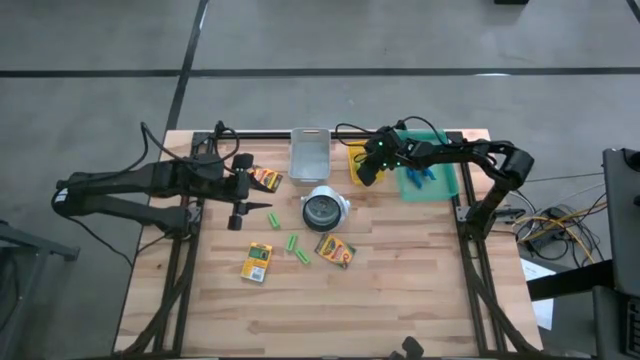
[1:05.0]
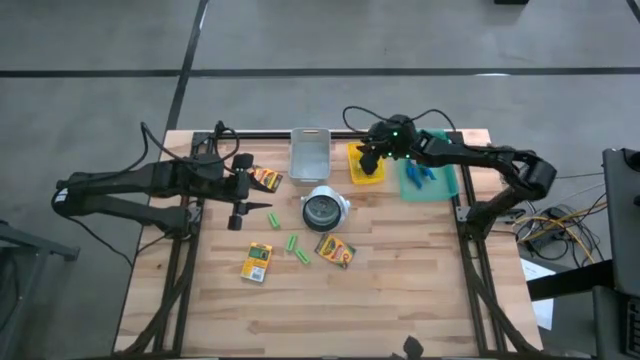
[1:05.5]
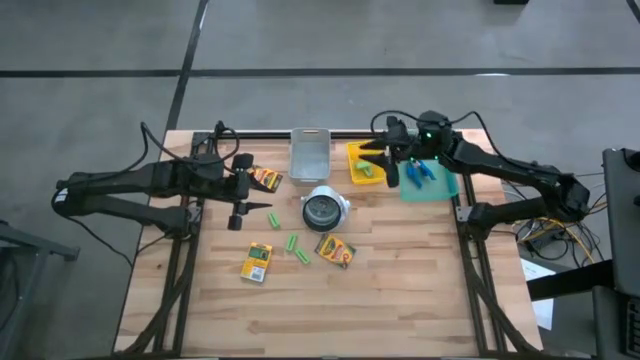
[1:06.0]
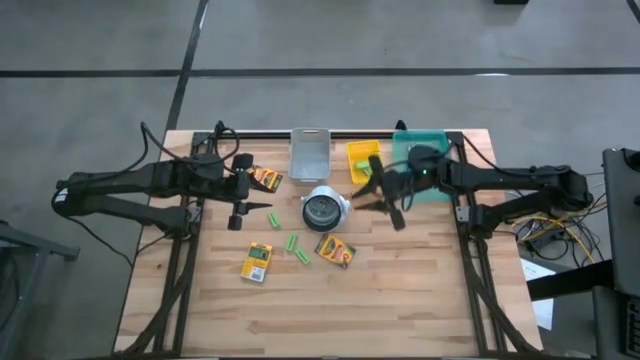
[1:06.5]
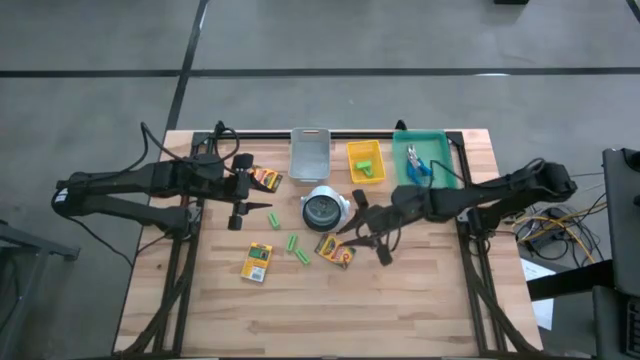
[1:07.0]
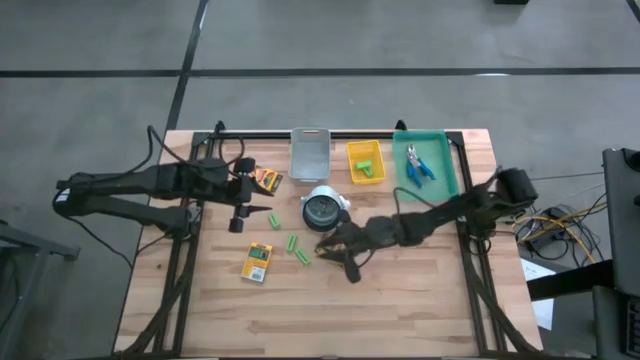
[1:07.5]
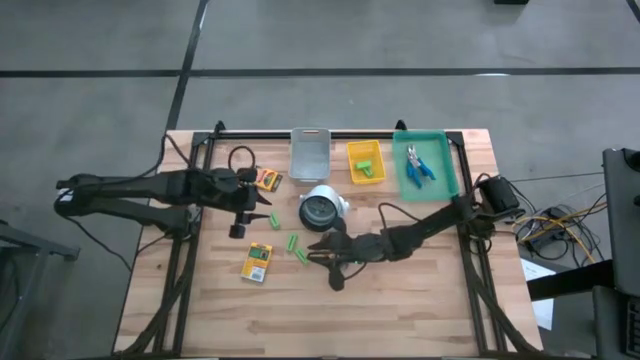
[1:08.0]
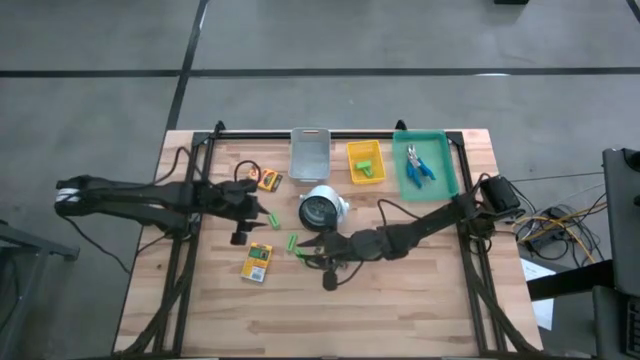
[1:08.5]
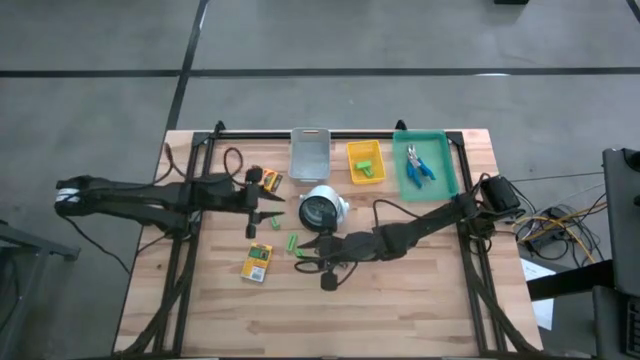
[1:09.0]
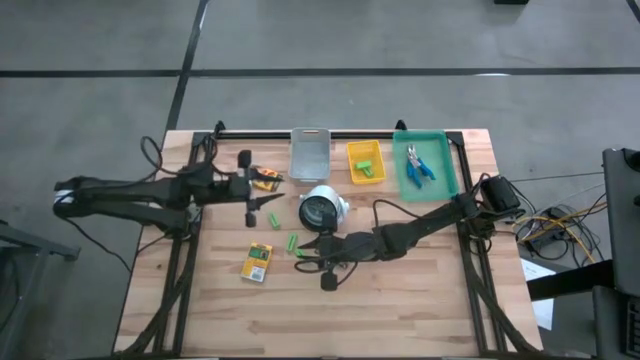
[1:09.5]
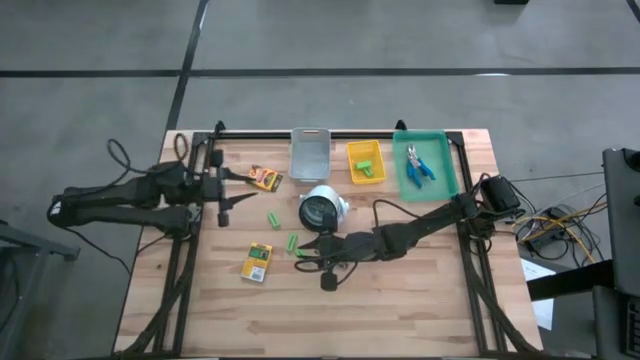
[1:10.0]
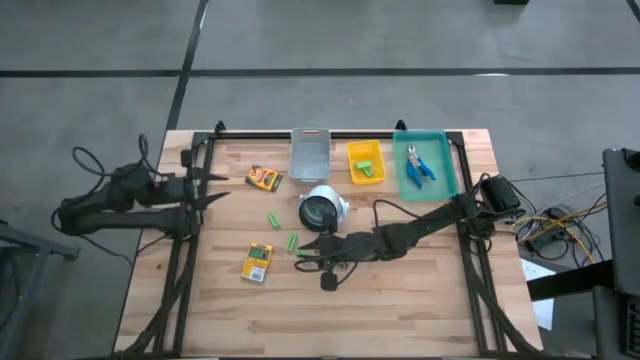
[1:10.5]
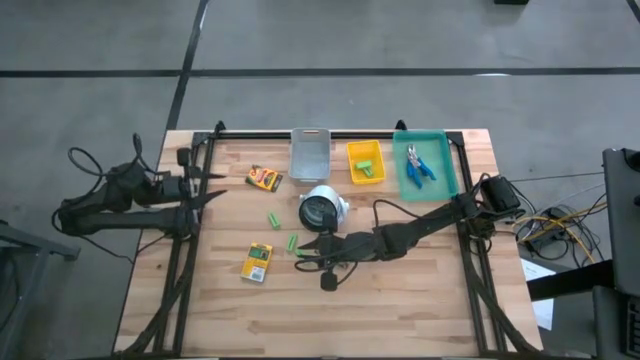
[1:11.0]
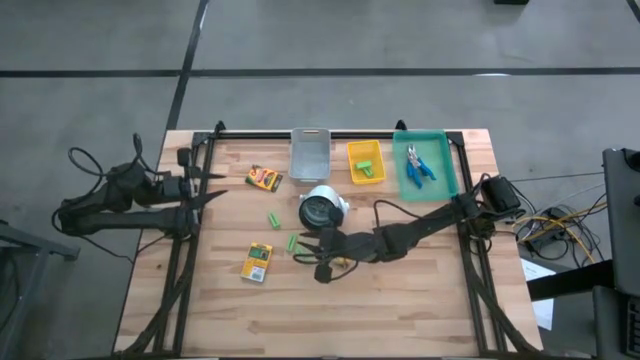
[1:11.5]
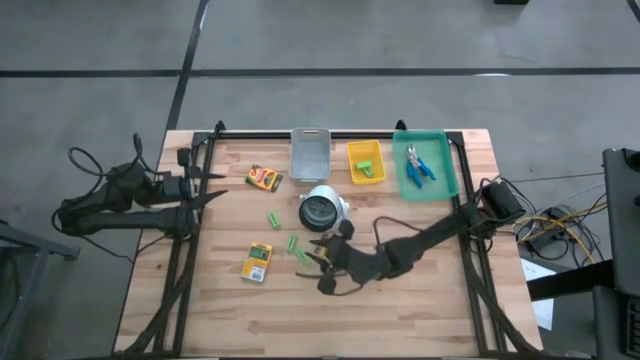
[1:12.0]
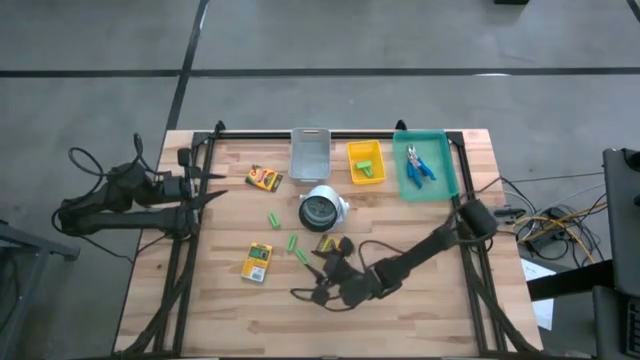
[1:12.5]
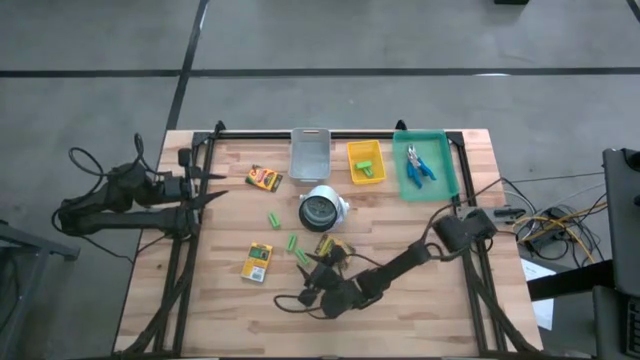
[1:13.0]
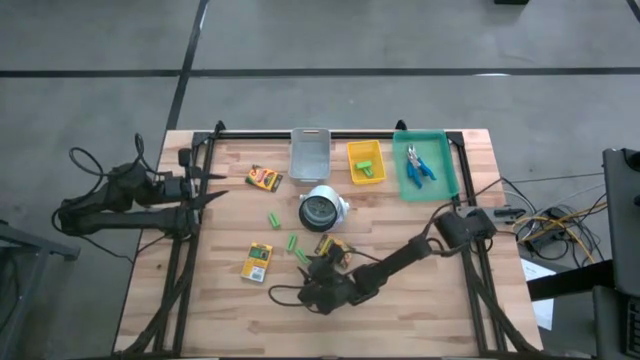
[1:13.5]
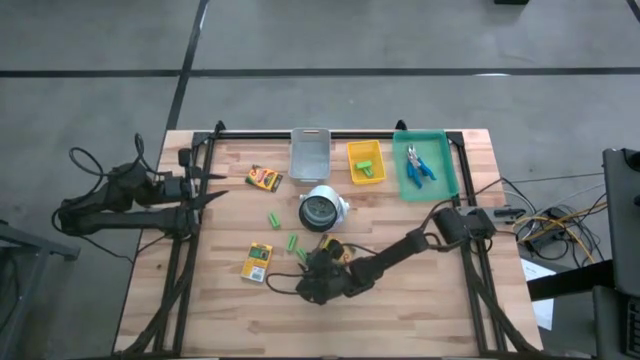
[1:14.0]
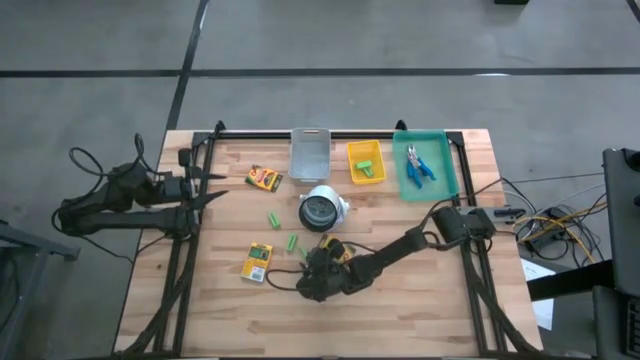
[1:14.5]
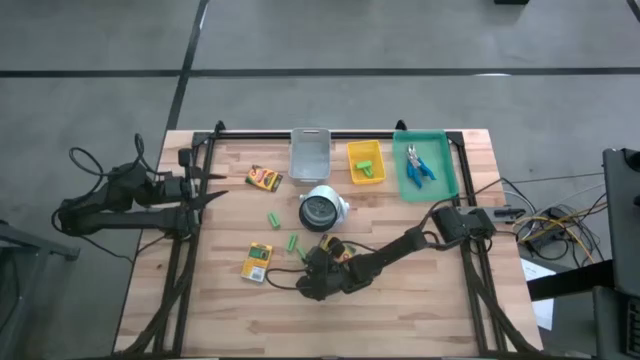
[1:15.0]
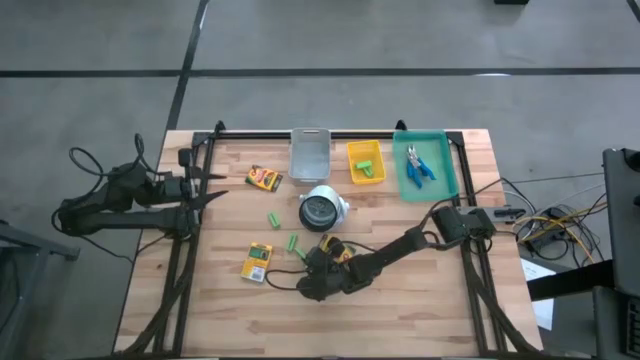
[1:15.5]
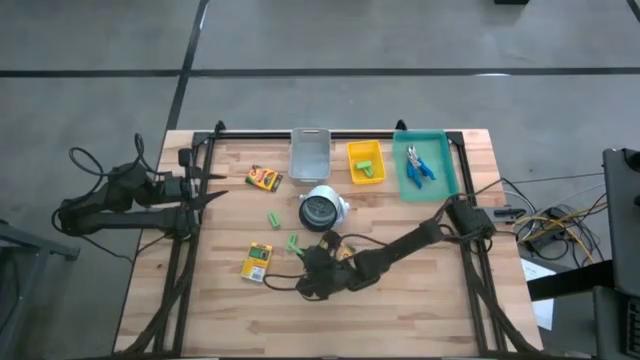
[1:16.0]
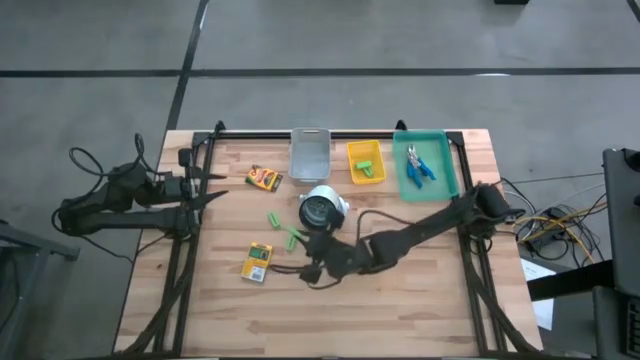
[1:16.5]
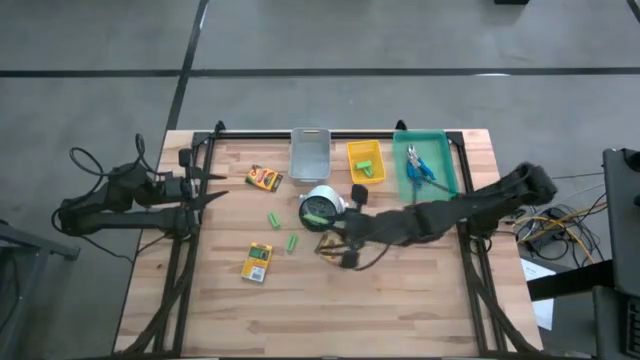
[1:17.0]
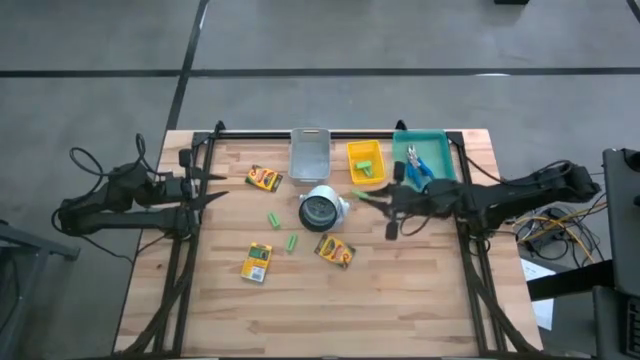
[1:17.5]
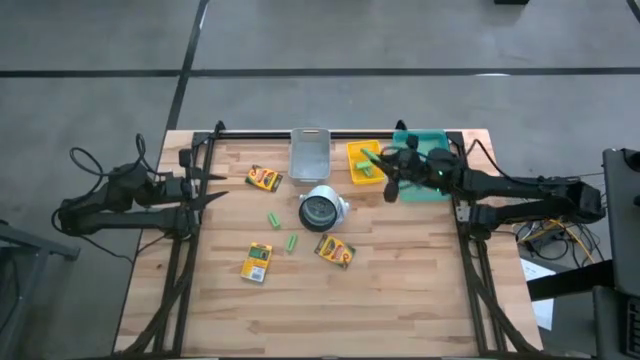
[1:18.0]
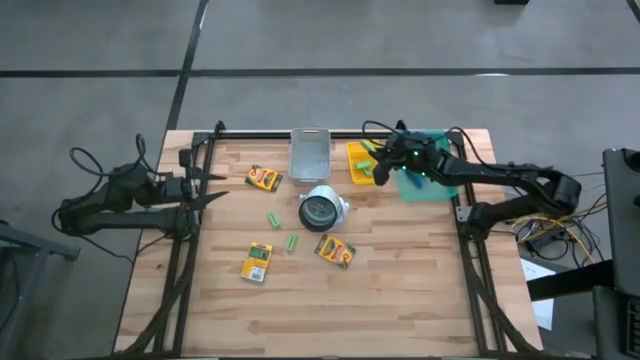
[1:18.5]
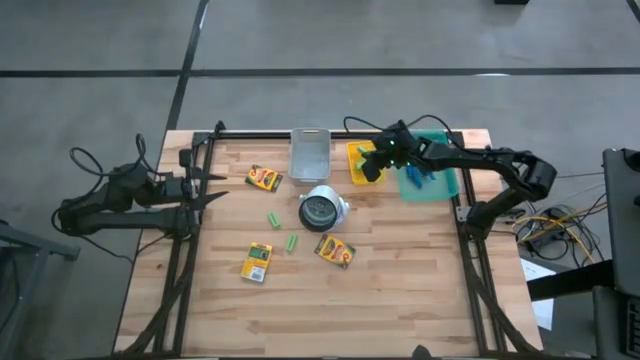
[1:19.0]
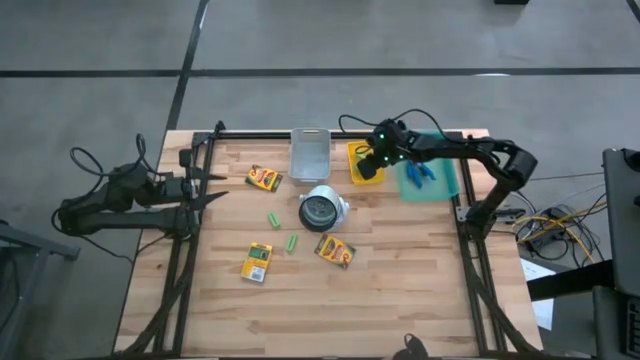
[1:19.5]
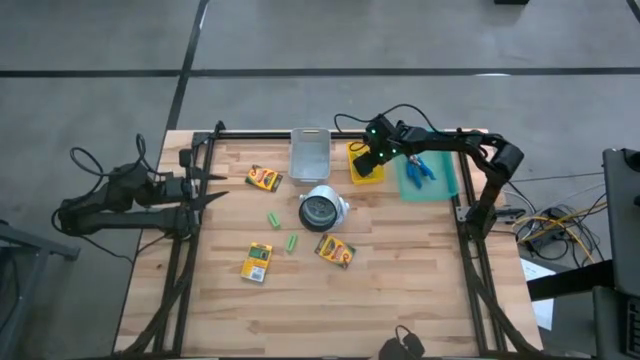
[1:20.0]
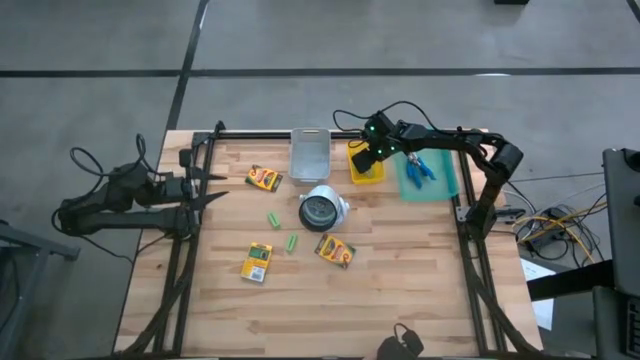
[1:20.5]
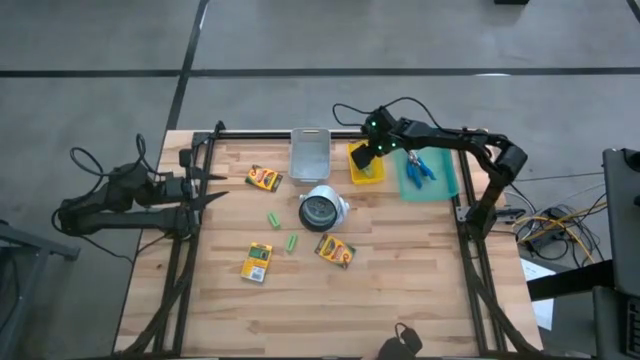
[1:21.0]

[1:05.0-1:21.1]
Task: Pick & Place School Supplies
Put the green eraser into the yellow bin

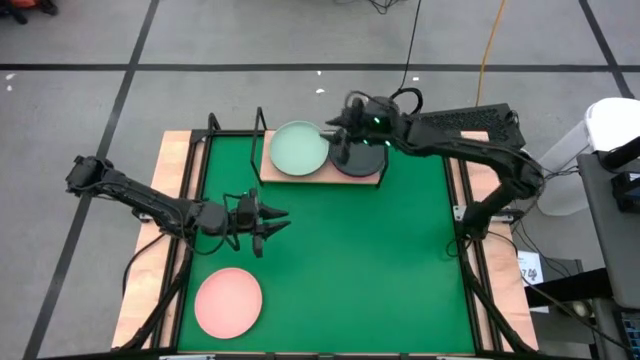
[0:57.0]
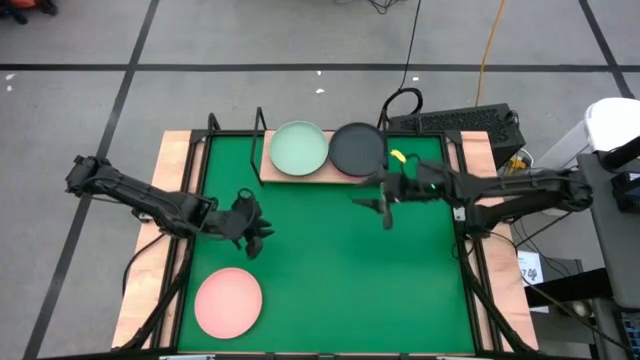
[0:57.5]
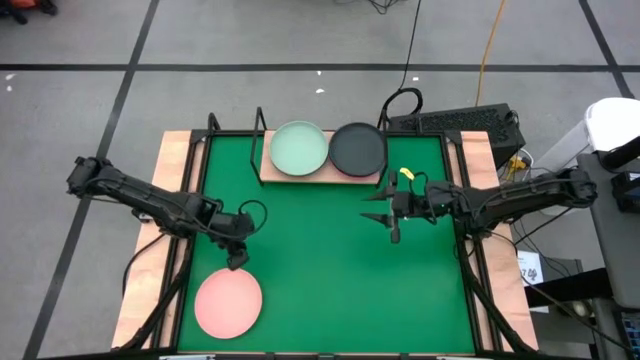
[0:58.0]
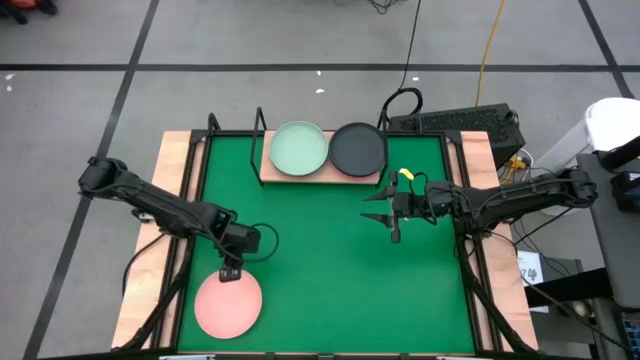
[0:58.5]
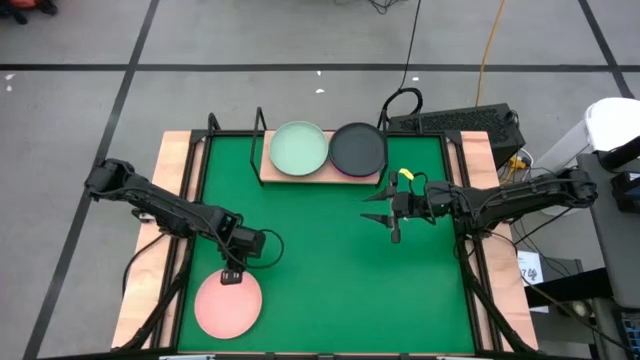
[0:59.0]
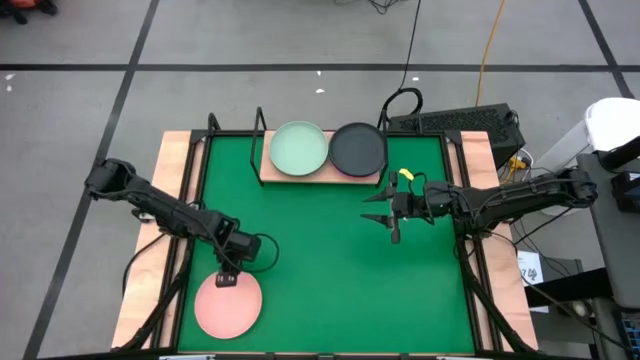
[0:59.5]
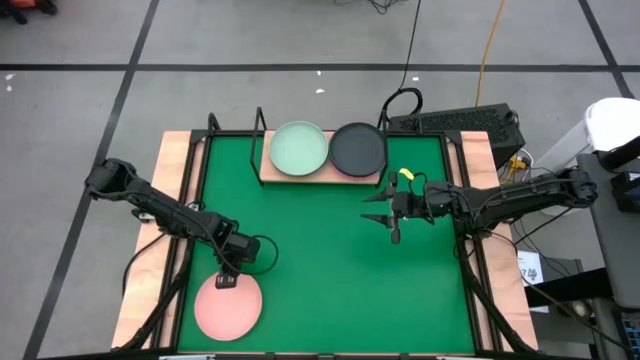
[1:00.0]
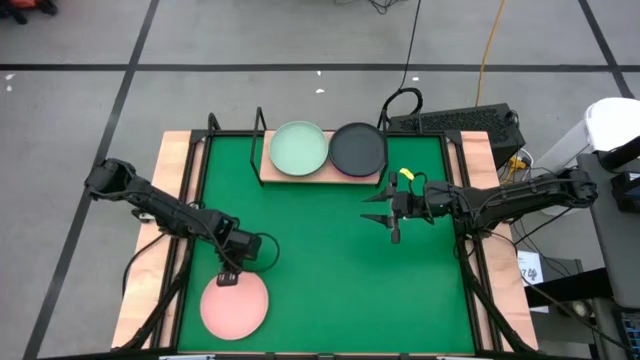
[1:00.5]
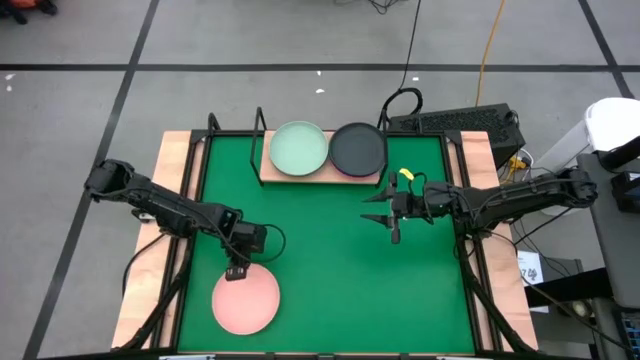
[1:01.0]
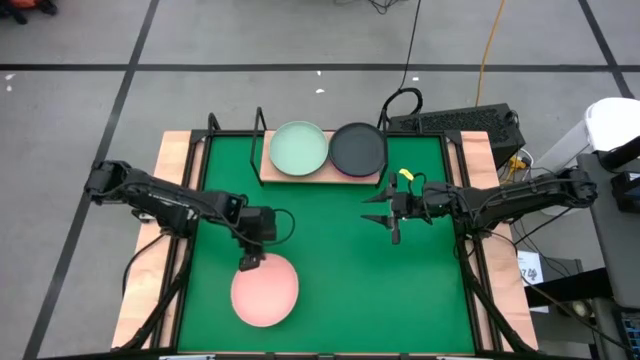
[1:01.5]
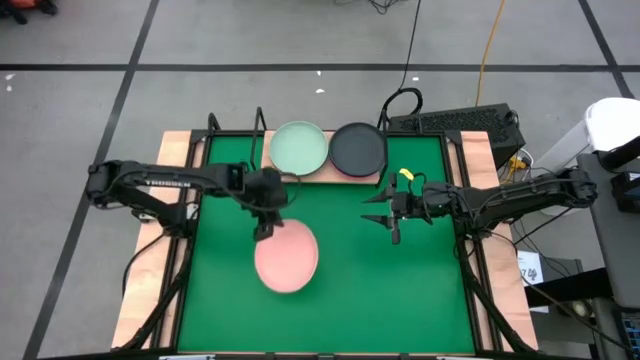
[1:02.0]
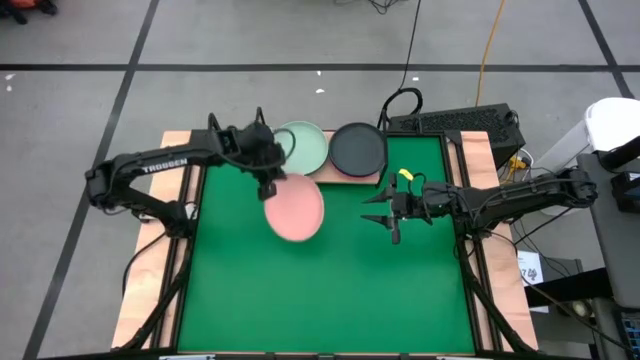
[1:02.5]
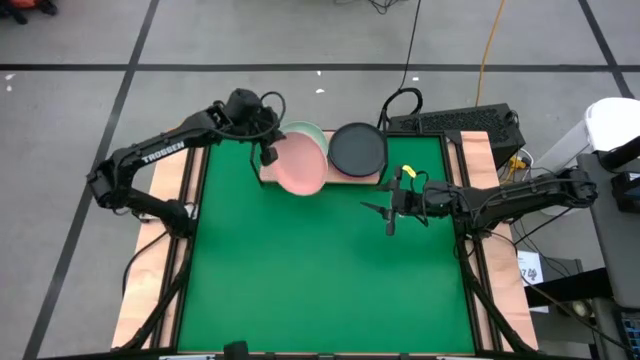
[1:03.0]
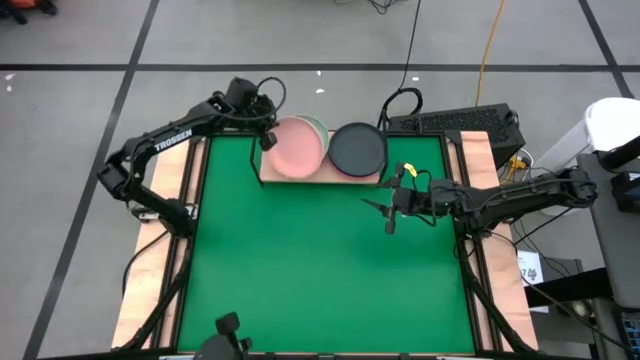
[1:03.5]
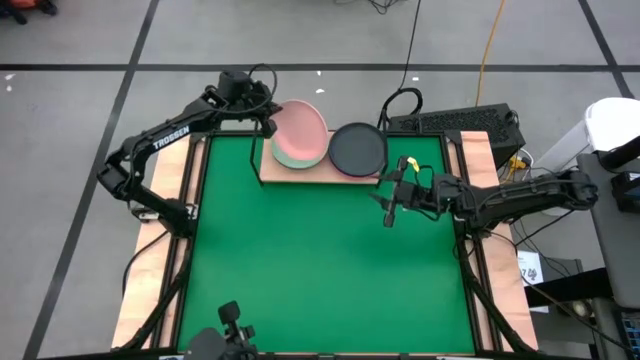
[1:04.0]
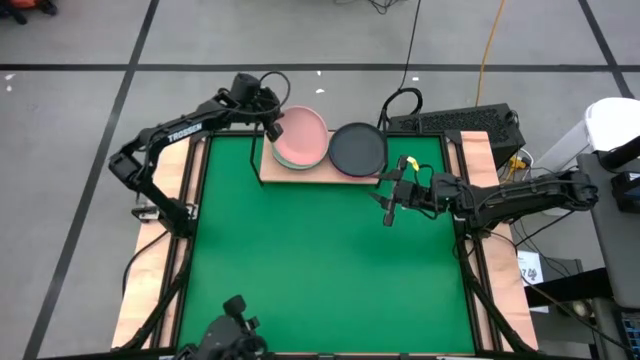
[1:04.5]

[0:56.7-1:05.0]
Task: Place and stack plates onto a shelf
Stack the light orange plate on top of the light green plate on the shelf
